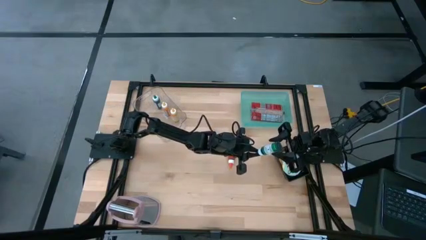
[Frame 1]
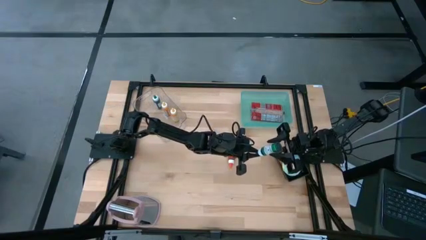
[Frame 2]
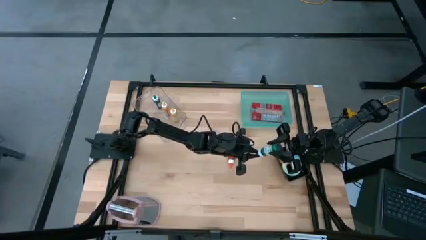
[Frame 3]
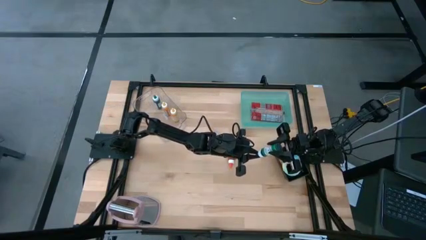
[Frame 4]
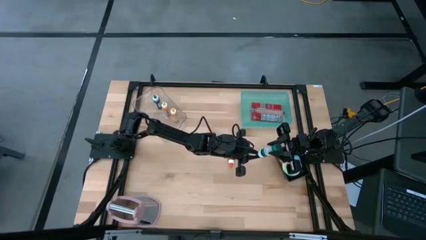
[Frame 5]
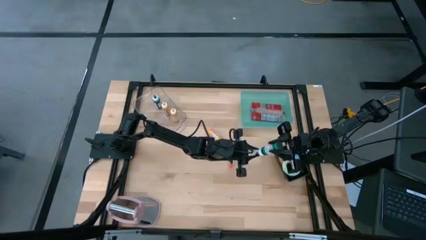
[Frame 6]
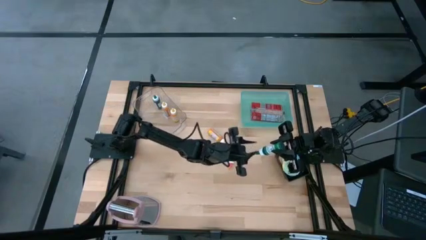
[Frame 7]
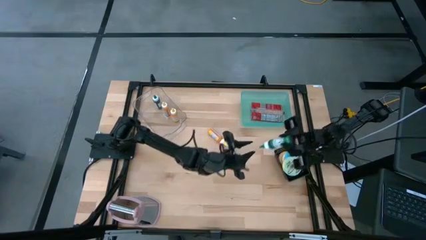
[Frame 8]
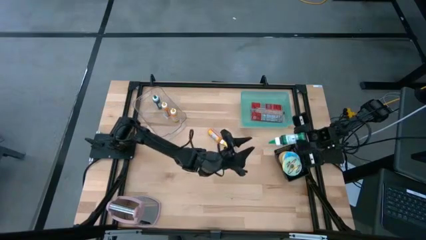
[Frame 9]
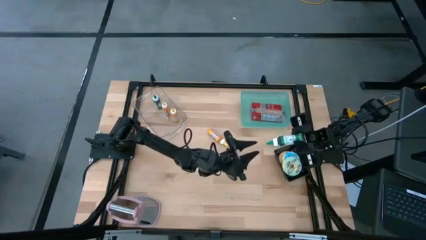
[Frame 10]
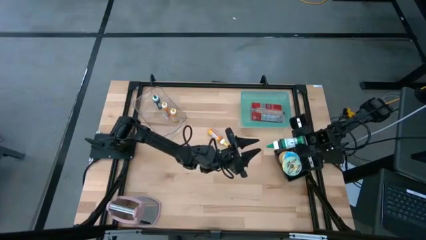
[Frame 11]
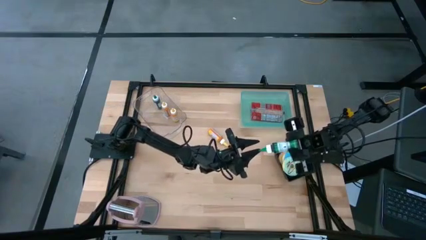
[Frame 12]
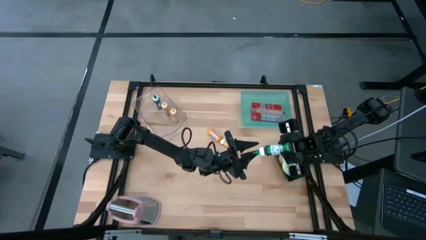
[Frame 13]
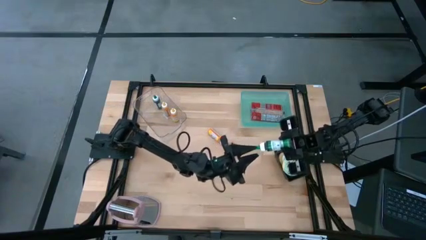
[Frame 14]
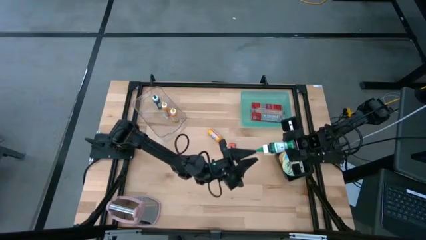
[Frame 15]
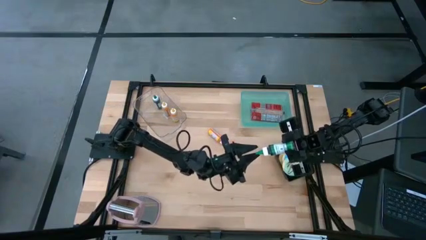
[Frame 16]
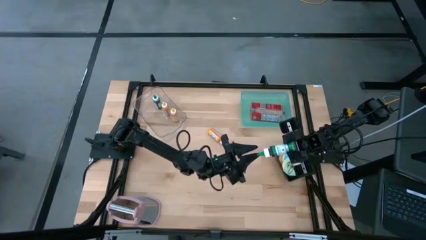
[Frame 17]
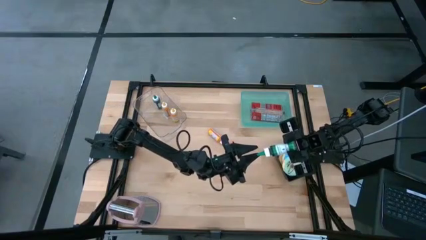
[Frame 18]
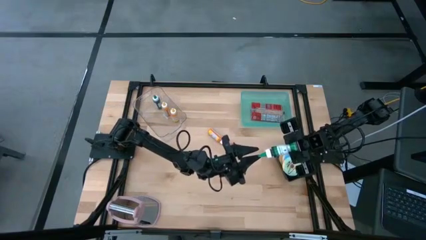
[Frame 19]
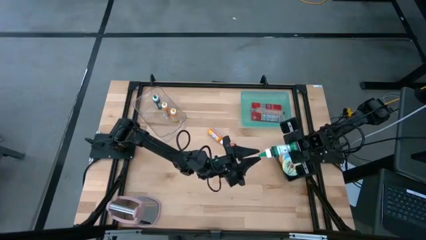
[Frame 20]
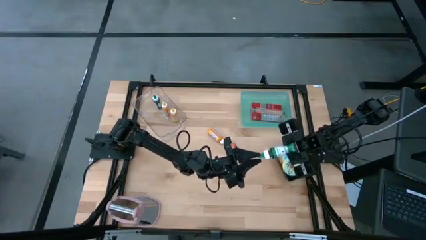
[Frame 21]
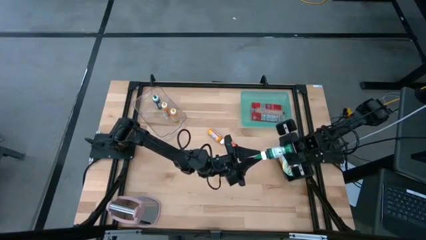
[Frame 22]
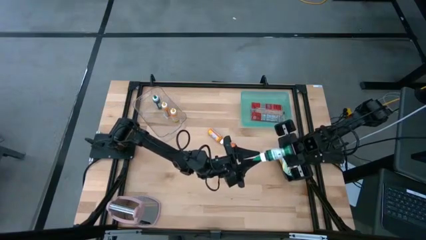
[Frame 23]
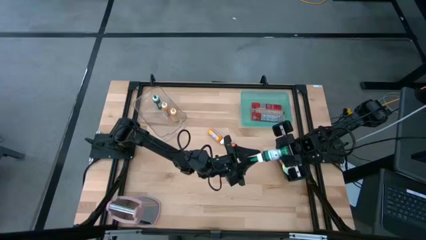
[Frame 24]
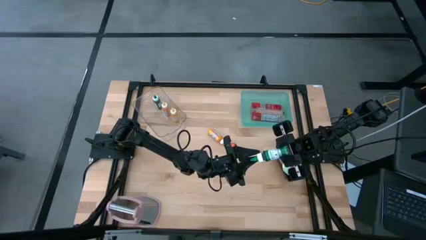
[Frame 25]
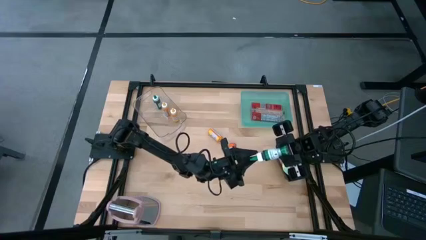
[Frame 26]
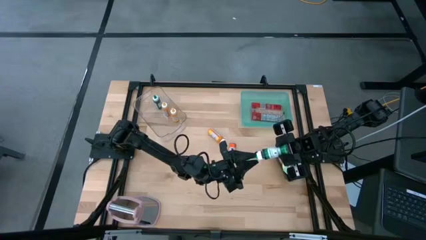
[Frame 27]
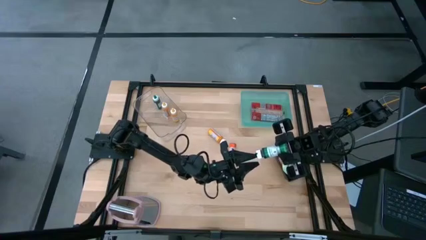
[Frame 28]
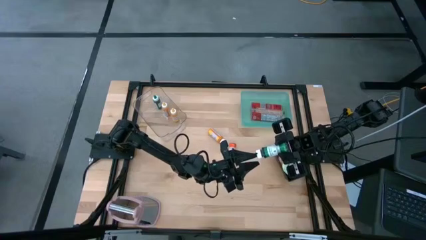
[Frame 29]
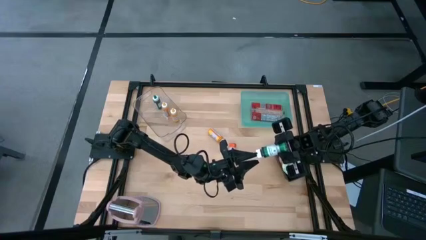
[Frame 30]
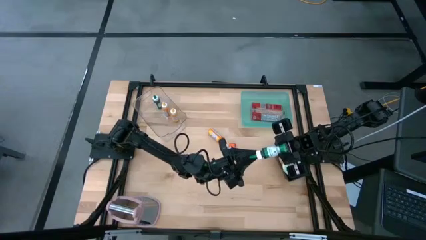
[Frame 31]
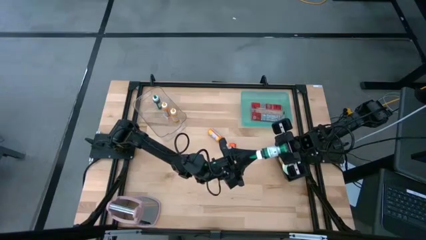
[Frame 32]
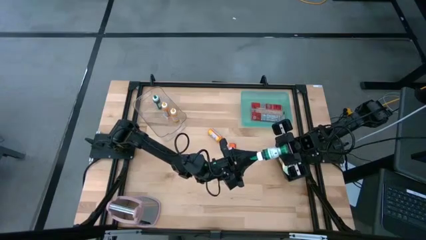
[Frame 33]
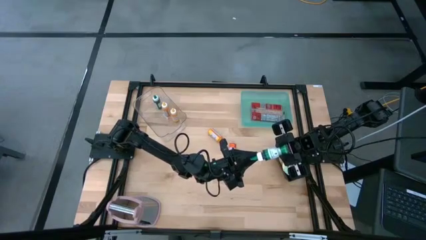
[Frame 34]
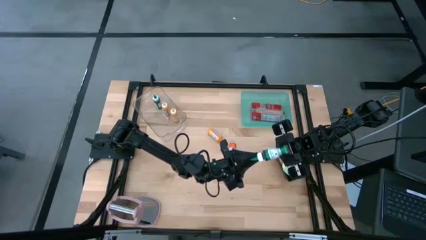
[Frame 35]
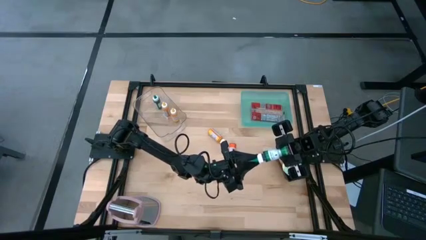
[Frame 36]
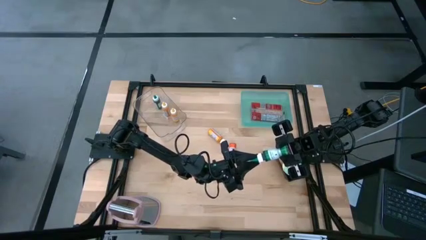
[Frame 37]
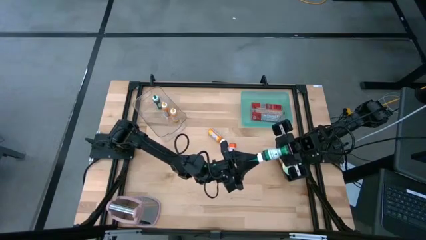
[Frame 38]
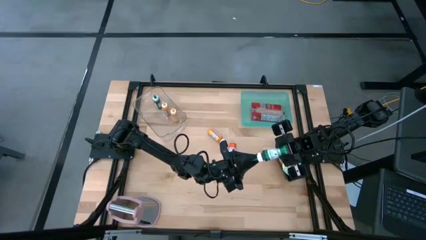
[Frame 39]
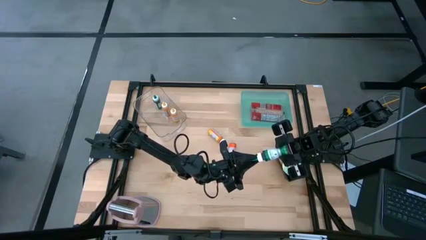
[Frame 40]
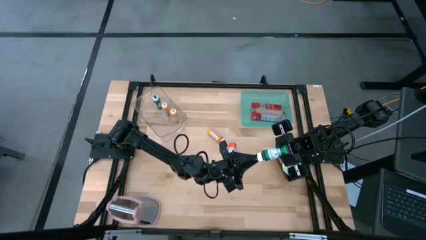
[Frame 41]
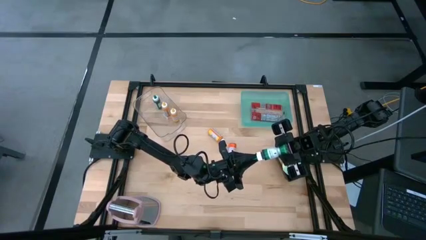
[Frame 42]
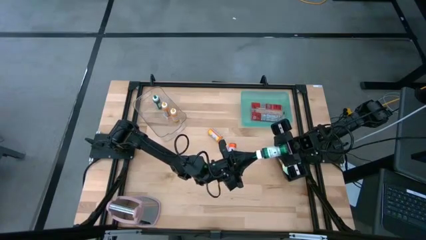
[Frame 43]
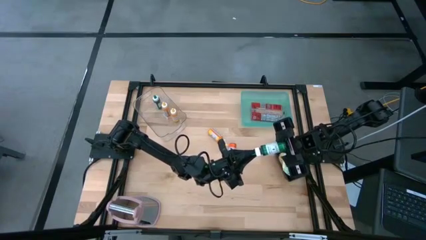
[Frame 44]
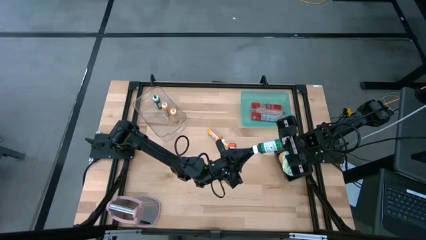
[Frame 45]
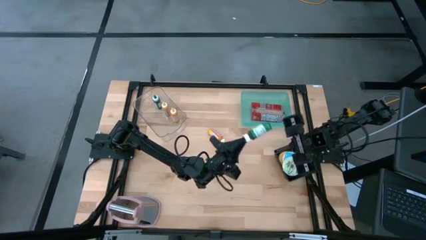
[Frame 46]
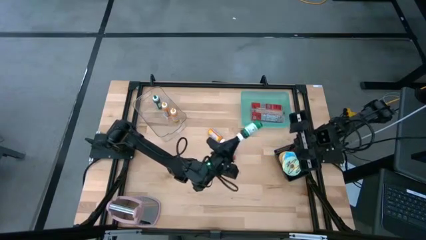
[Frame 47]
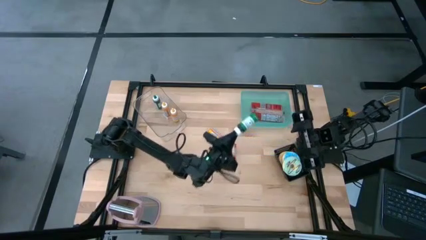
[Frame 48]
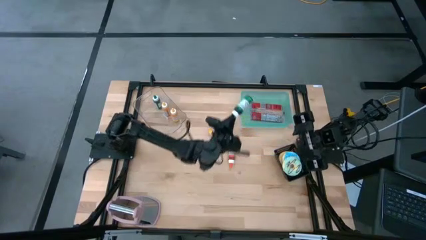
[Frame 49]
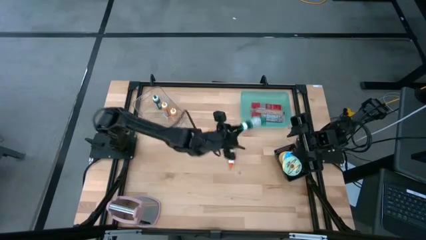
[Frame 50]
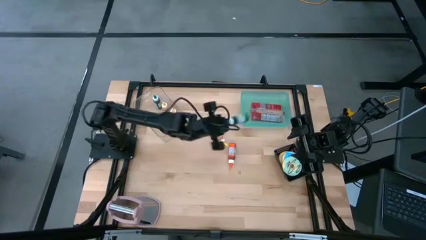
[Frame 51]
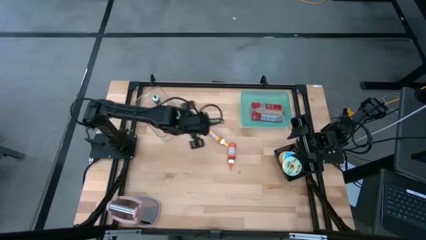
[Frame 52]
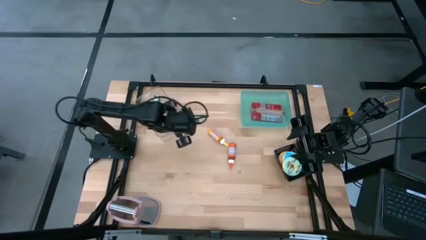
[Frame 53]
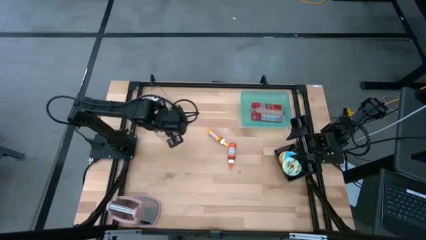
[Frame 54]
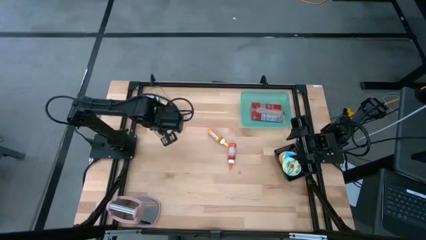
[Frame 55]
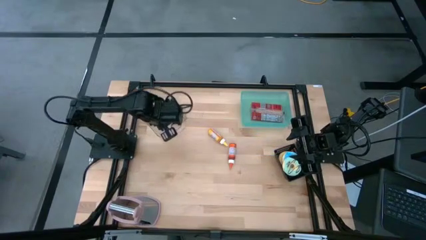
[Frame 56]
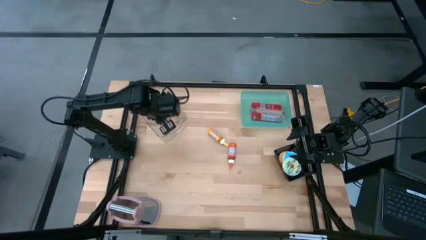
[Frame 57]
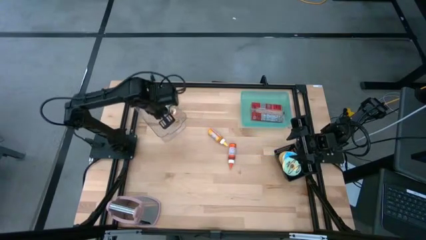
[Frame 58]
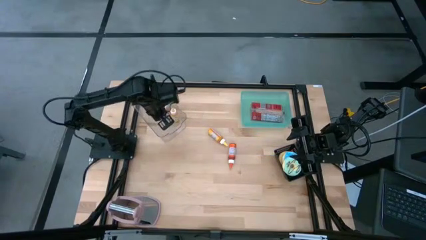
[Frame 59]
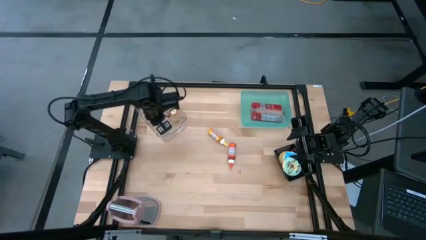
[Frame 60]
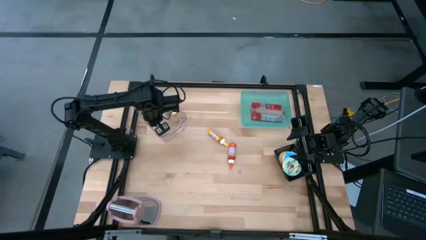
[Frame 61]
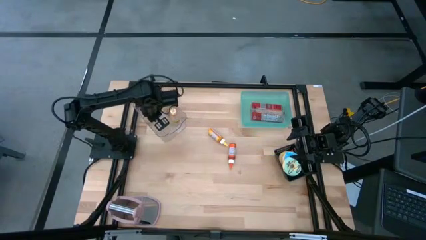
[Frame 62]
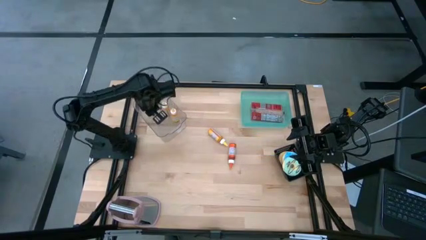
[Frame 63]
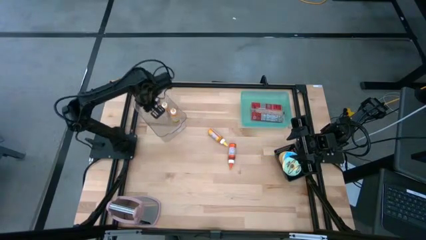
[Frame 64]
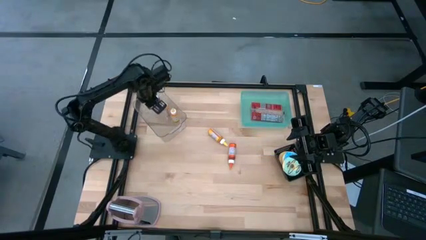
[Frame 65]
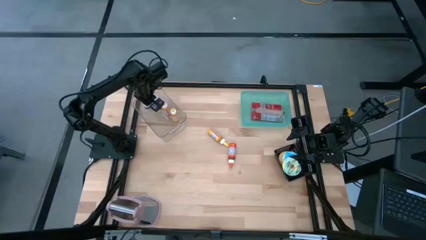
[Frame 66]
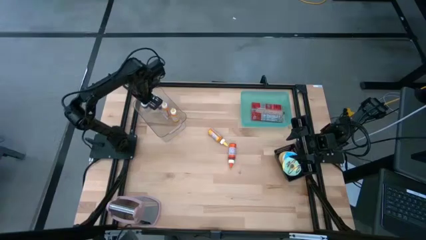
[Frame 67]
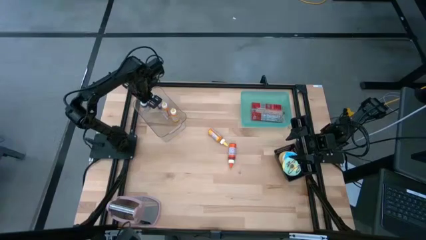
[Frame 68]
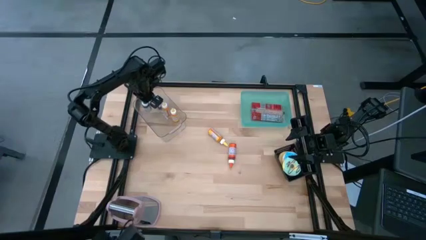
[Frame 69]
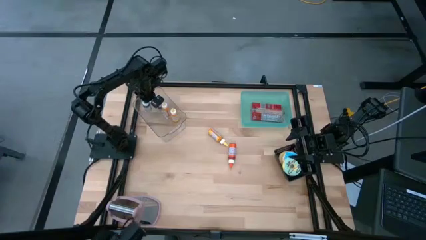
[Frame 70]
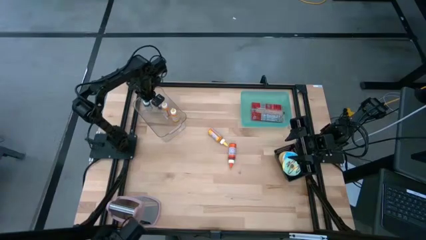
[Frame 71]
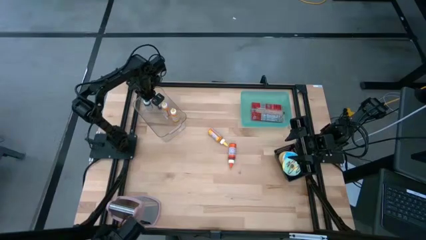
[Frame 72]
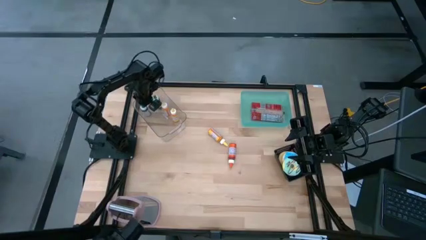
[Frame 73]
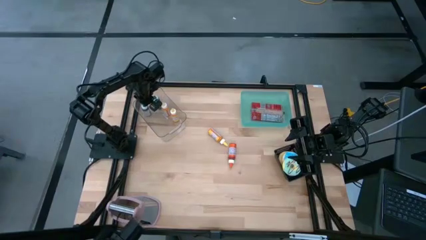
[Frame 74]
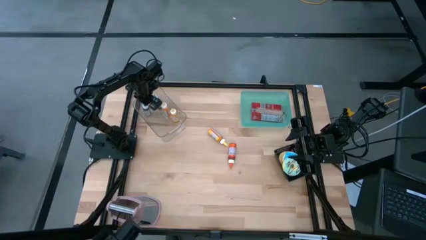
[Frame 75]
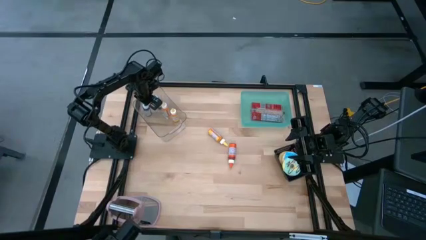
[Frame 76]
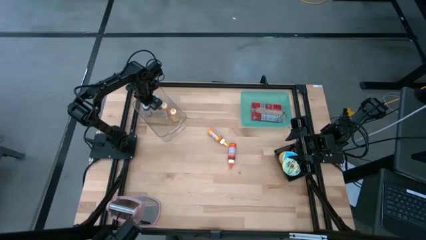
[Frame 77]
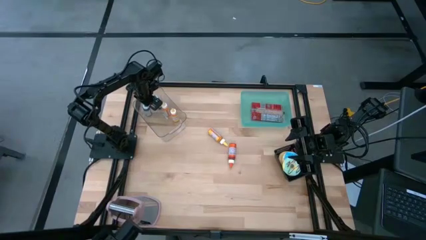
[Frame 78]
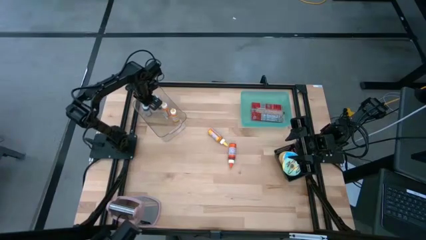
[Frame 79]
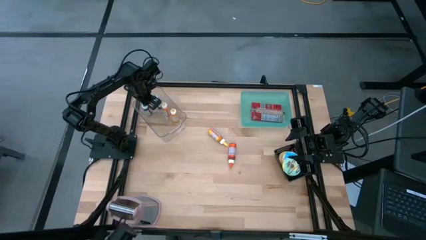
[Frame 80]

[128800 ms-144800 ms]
Put the green food coloring bottle into the transparent bin
